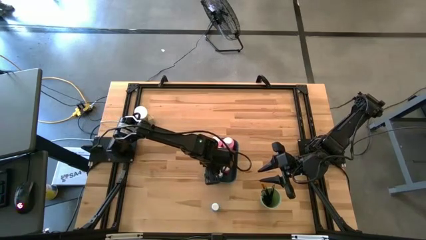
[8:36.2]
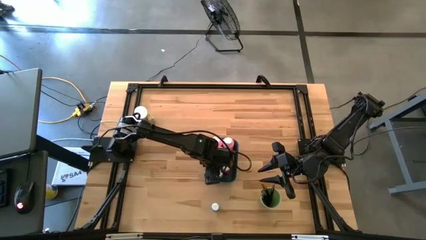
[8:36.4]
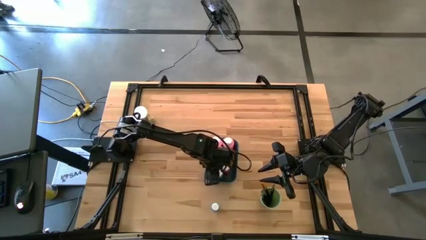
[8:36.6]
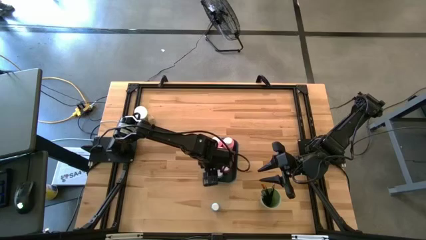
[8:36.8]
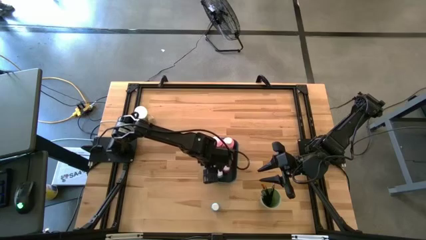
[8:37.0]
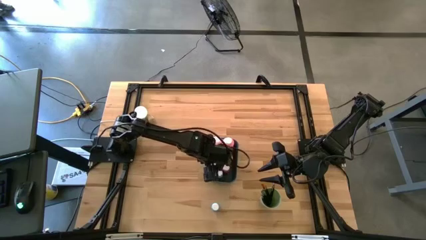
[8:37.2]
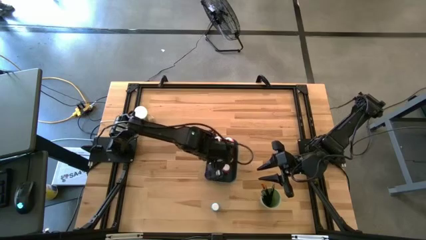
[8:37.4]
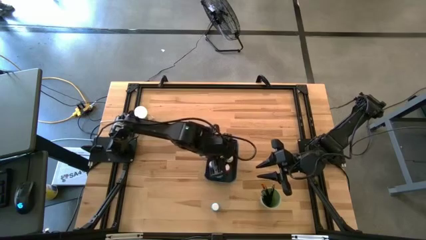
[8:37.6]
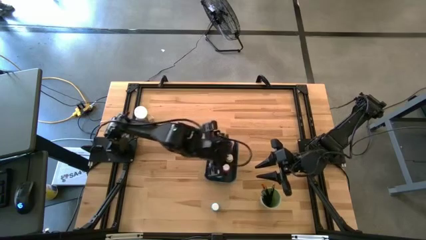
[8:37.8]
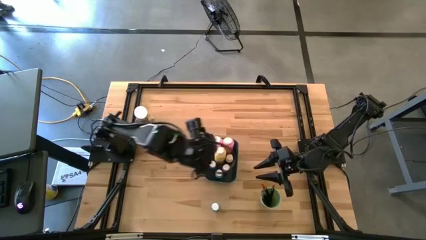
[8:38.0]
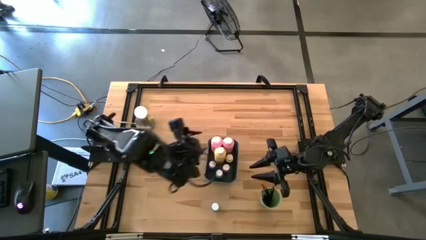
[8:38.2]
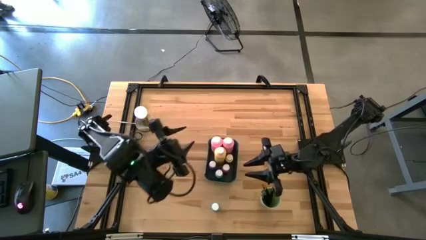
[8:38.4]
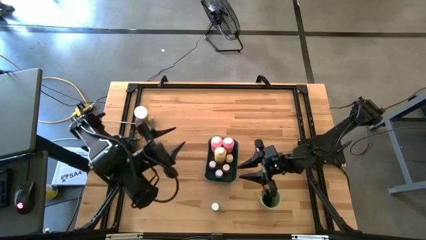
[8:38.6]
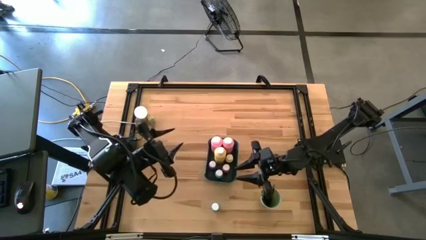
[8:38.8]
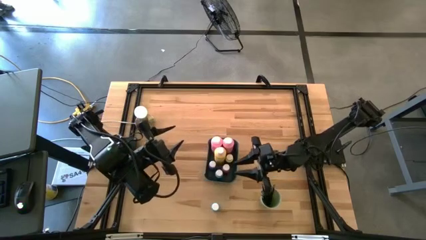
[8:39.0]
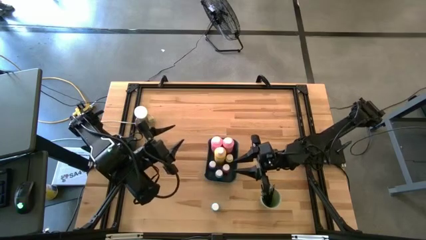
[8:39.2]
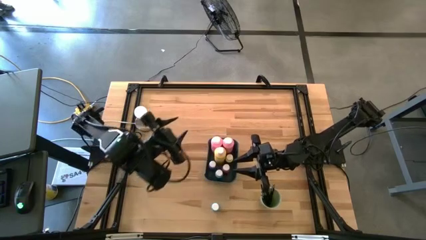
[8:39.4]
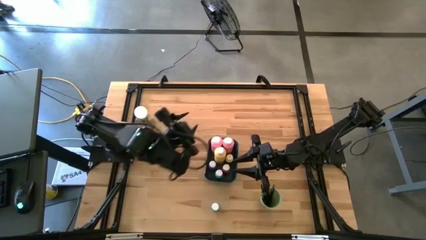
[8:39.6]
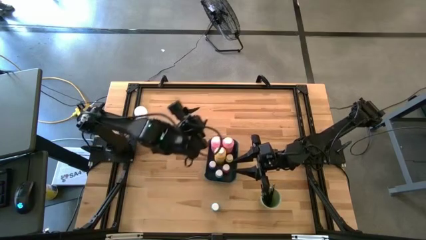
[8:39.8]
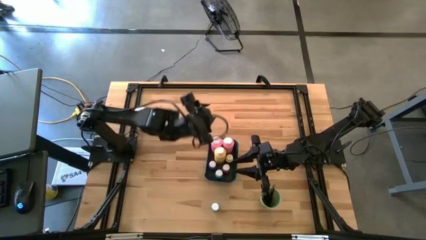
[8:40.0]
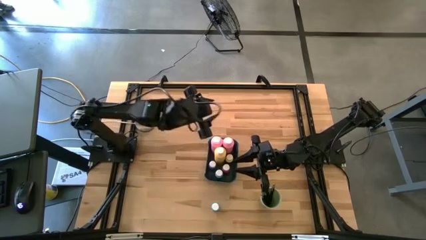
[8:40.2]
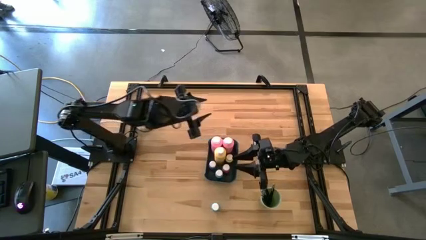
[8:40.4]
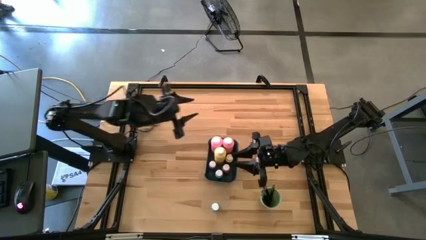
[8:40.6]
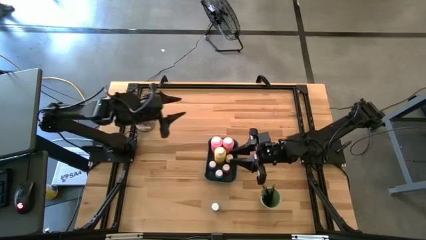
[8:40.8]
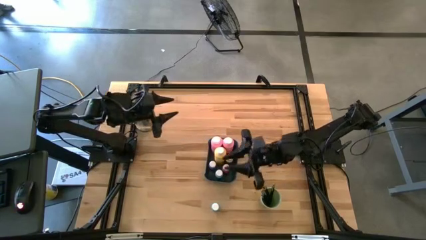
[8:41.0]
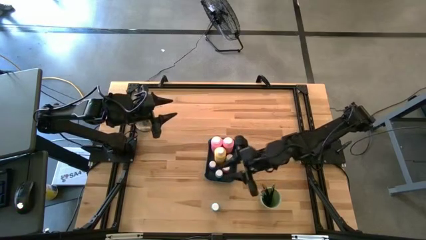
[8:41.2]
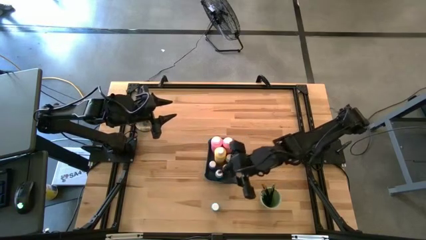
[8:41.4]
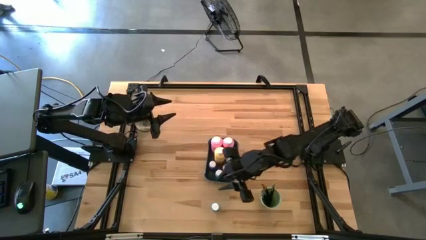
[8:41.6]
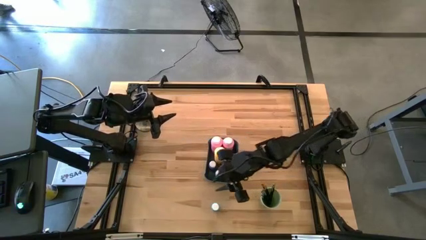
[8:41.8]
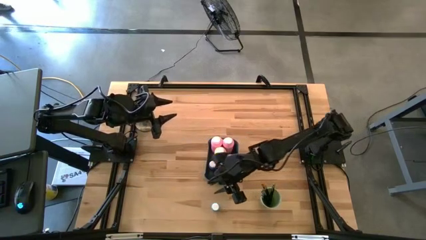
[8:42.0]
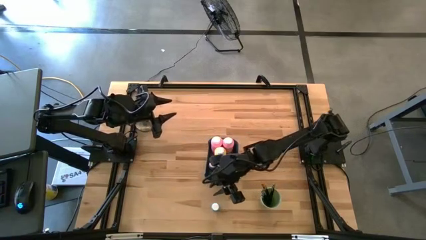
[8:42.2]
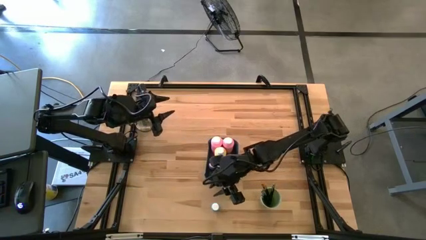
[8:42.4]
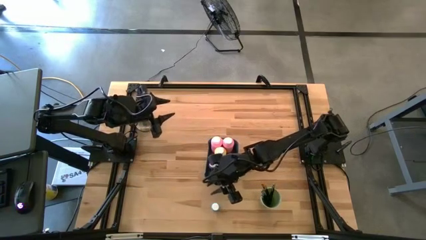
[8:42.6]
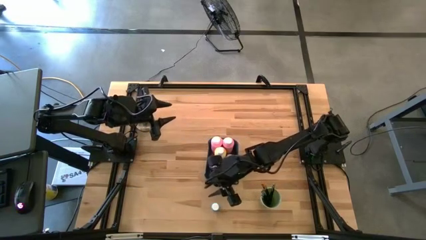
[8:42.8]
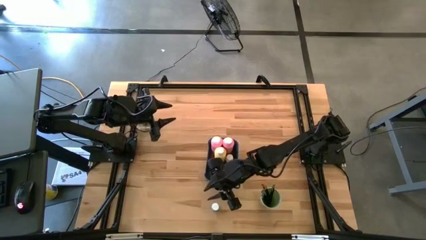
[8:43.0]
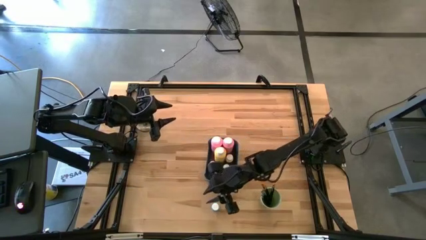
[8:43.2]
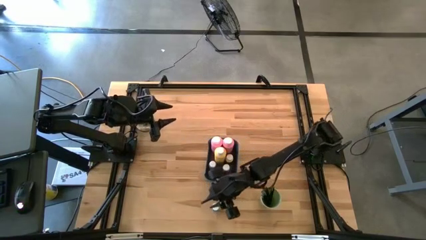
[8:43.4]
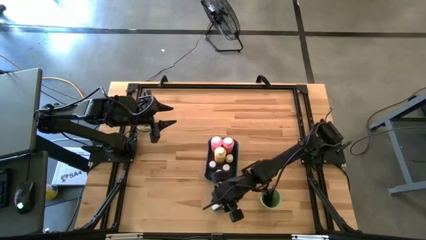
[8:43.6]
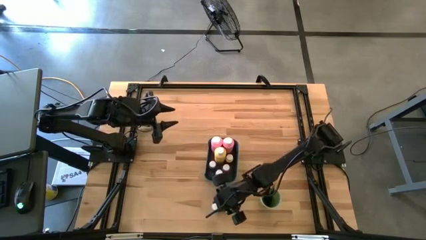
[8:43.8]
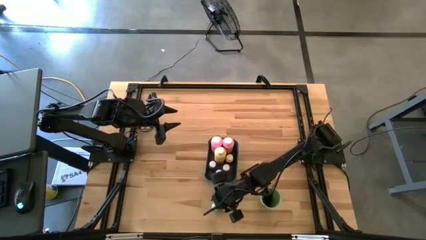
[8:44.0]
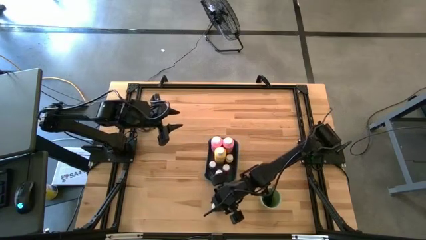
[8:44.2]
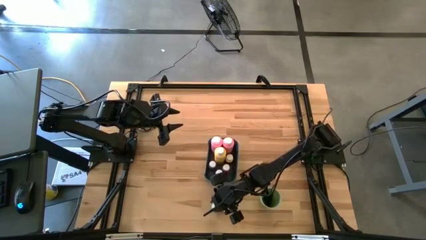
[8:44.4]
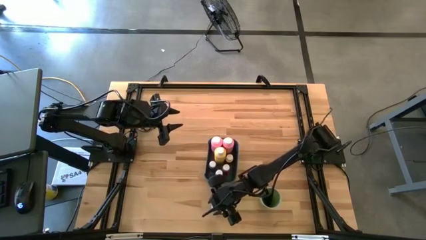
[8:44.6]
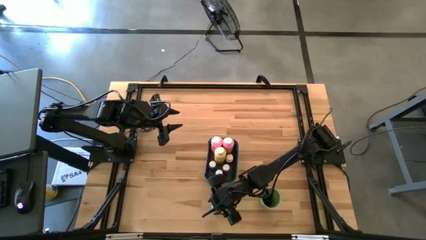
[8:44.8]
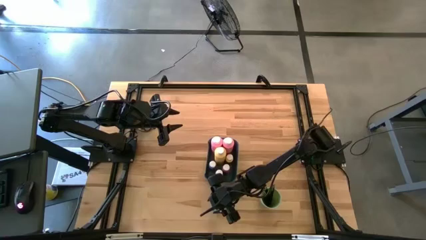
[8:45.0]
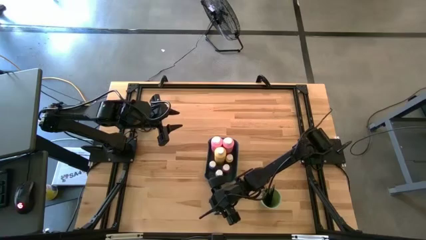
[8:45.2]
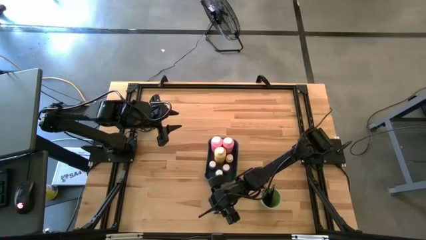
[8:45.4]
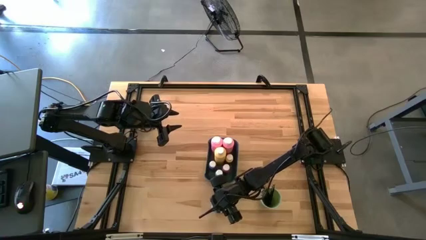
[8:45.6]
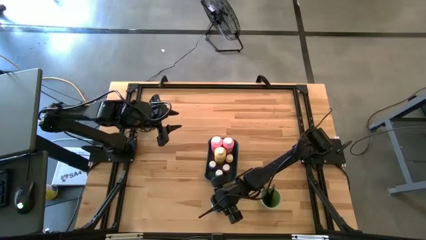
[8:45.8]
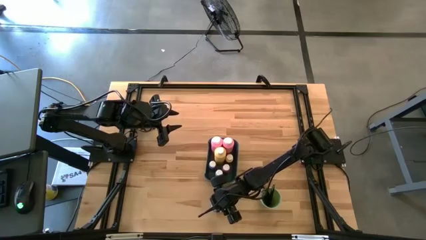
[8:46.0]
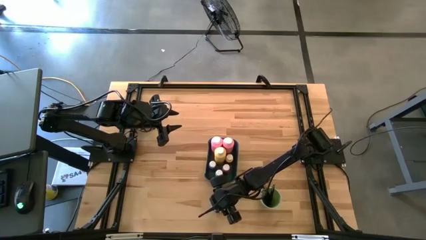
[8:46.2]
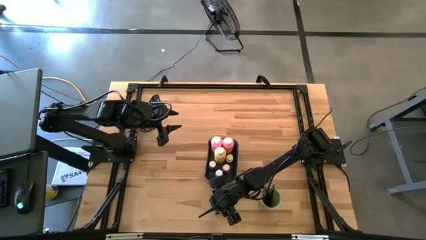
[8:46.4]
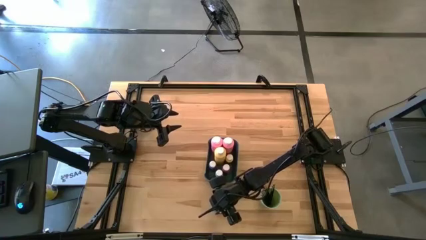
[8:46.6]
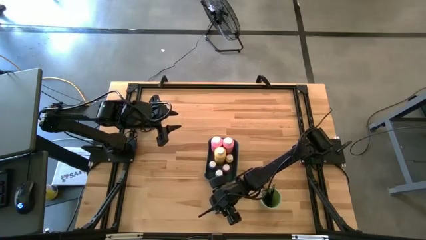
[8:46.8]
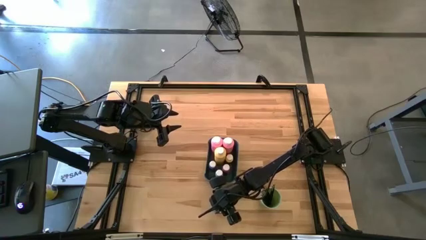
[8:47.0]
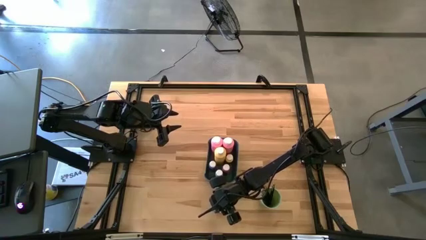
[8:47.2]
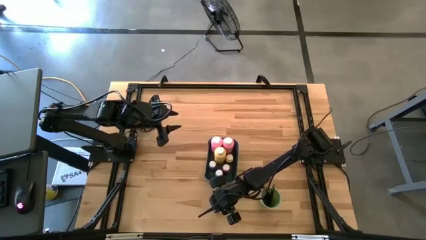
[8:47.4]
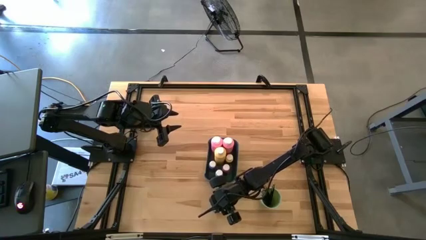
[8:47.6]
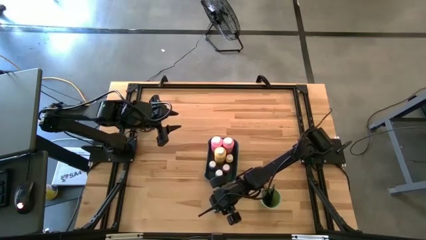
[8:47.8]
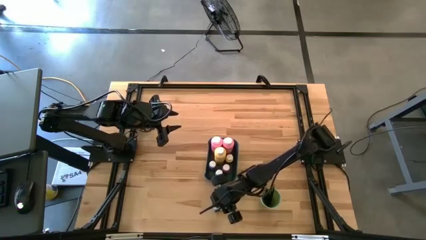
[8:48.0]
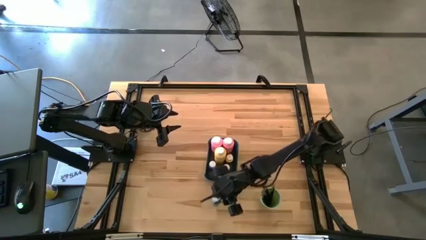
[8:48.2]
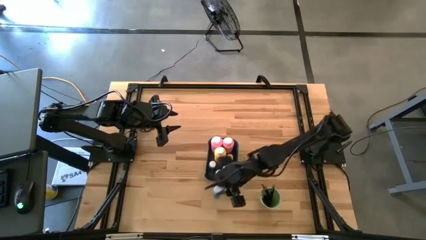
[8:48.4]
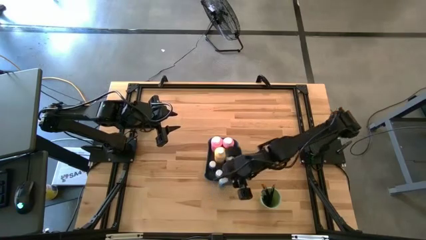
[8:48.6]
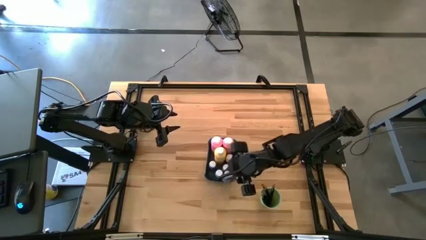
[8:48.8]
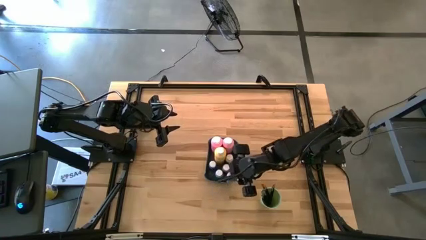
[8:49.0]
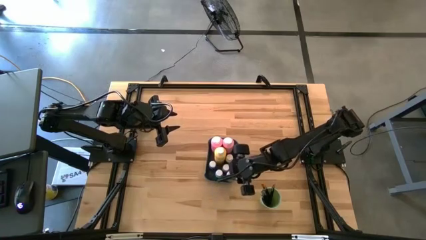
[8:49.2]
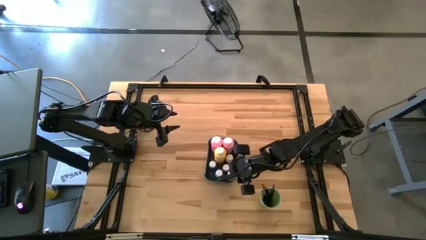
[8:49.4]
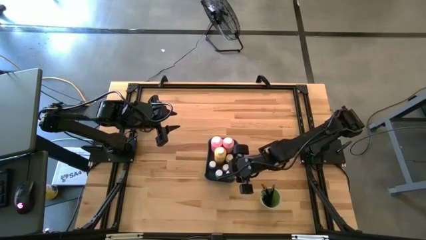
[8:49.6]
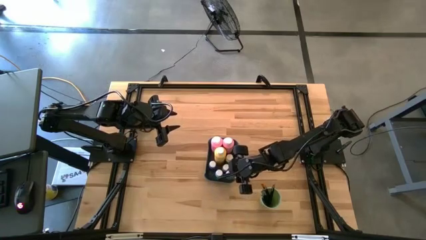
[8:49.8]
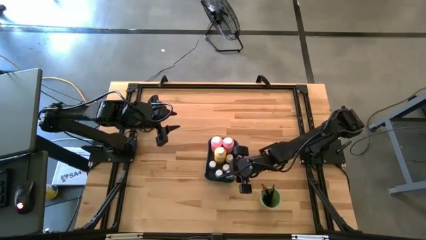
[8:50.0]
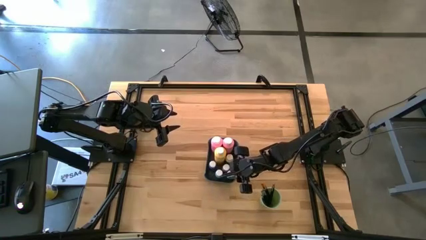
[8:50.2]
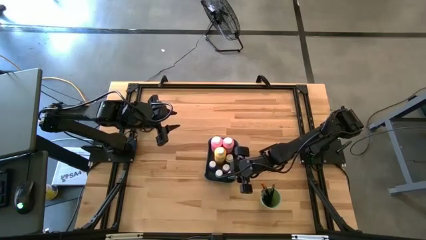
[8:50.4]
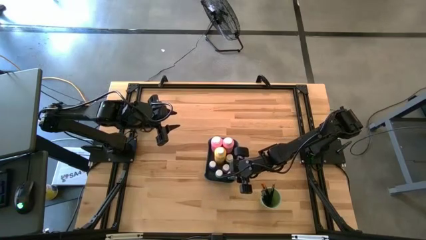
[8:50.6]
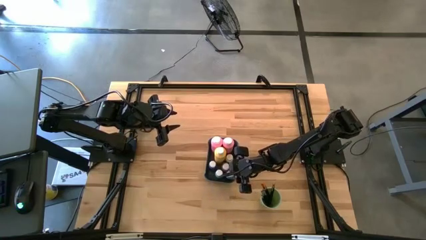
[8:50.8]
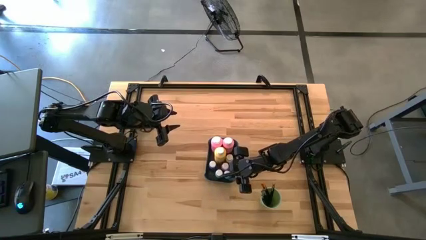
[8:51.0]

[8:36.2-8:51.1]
Task: Pick & Place Paint Supplies
Put the small blue and black paint bottle into the blue bin
